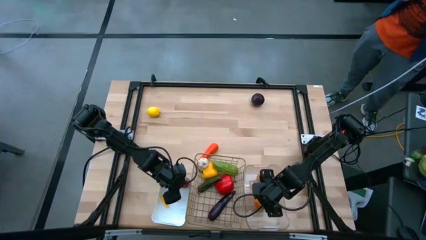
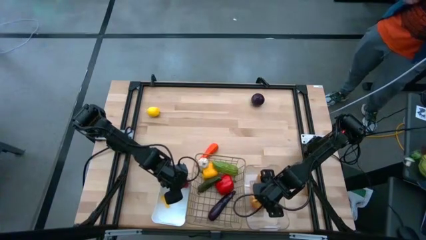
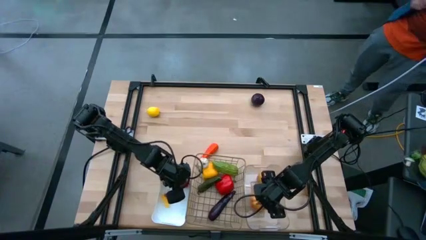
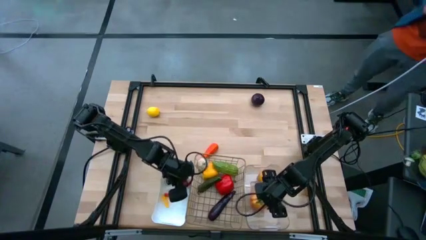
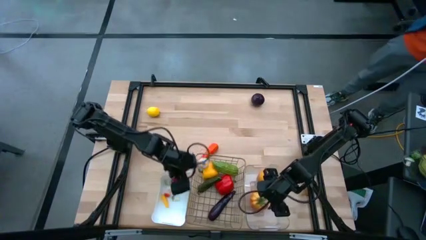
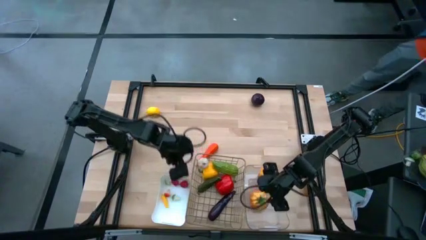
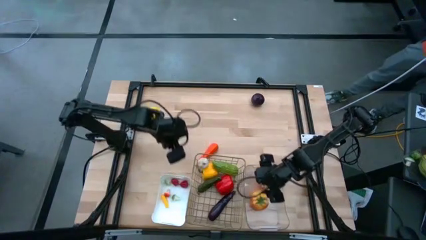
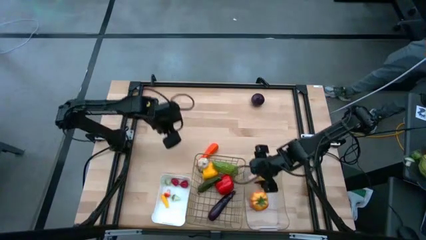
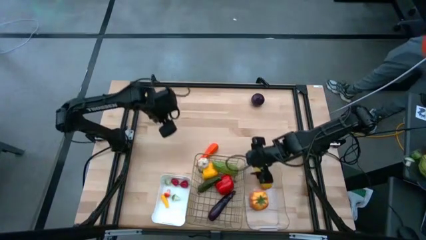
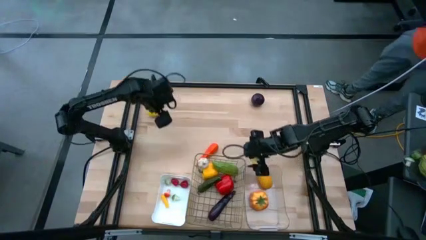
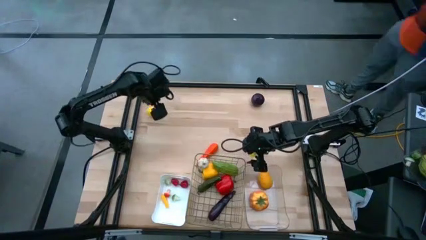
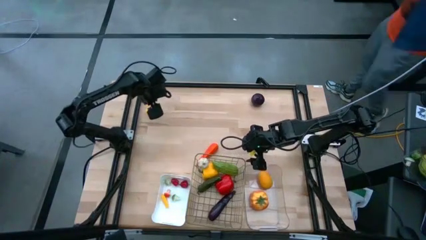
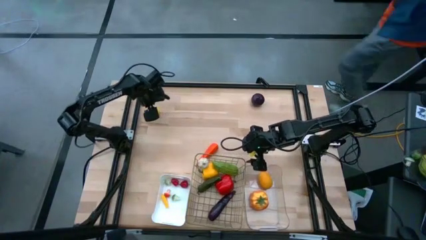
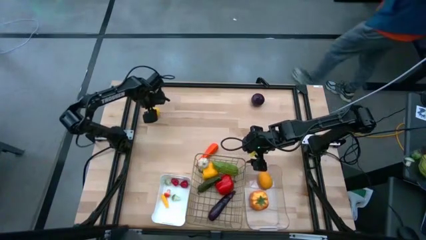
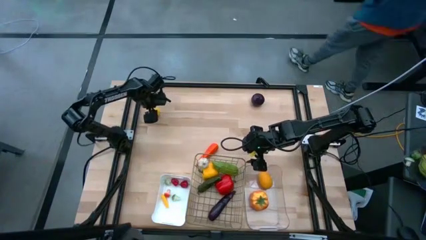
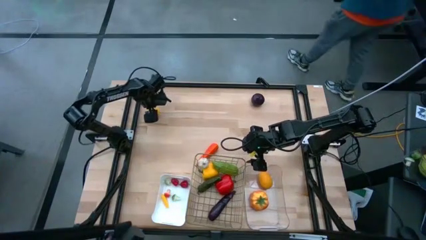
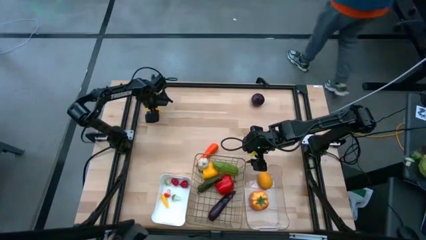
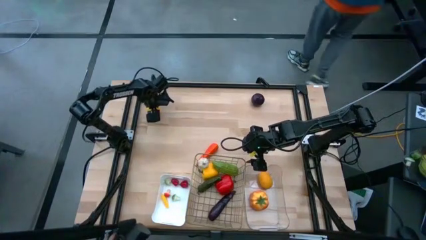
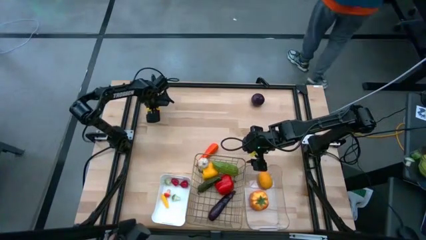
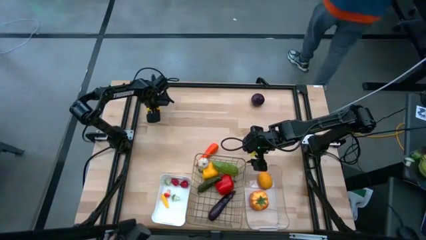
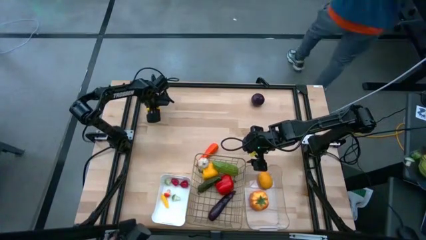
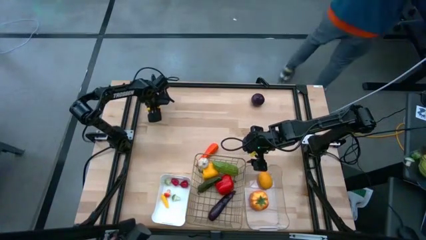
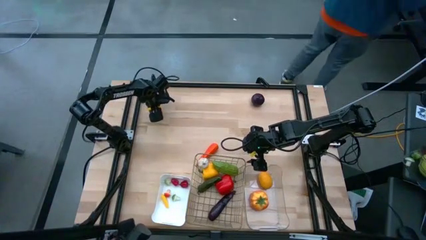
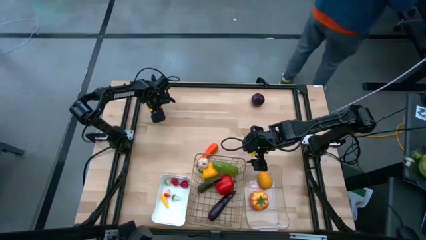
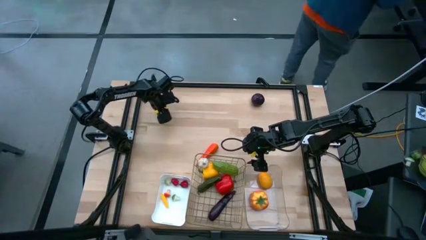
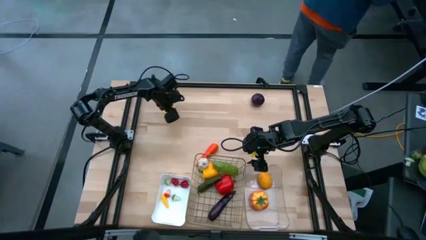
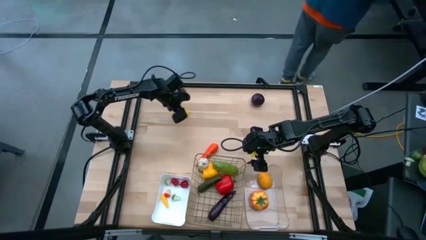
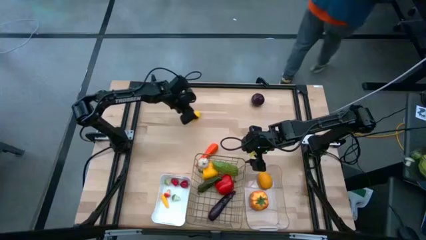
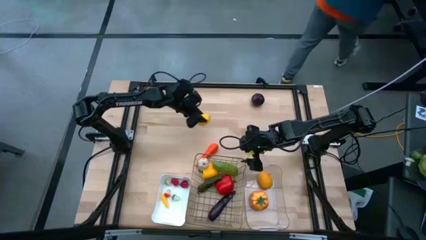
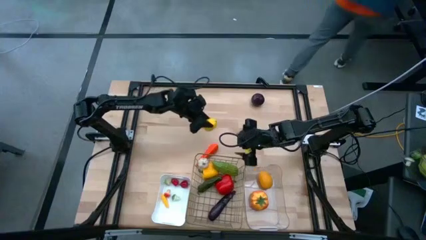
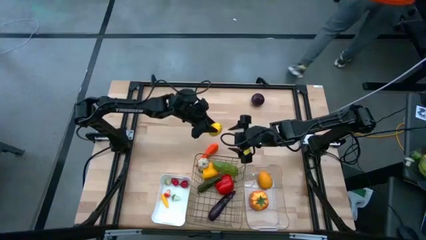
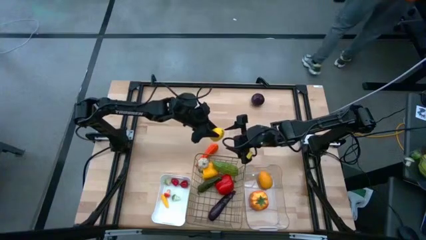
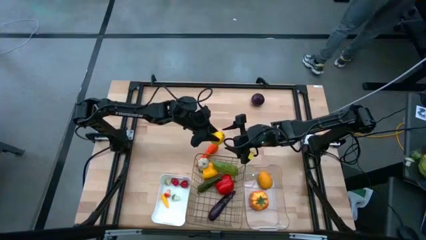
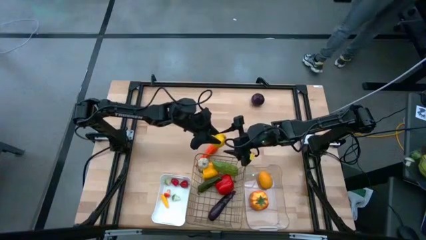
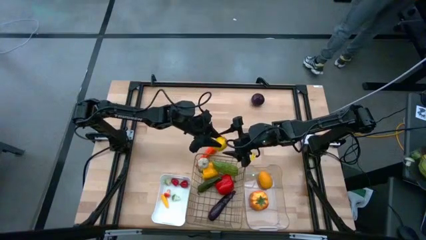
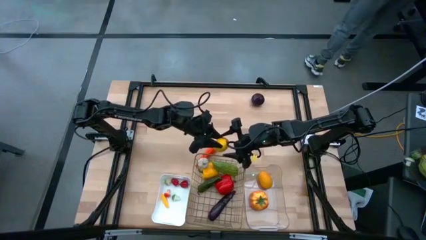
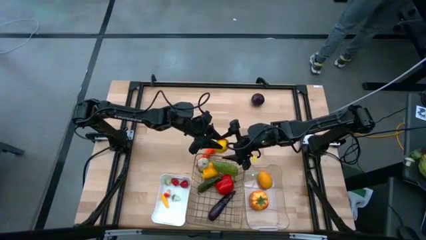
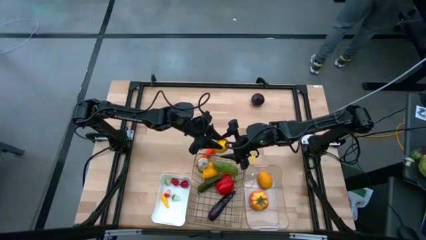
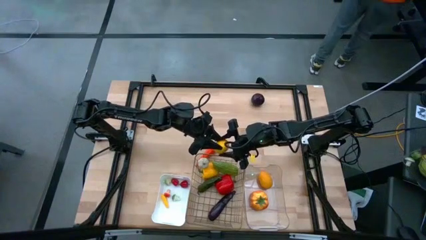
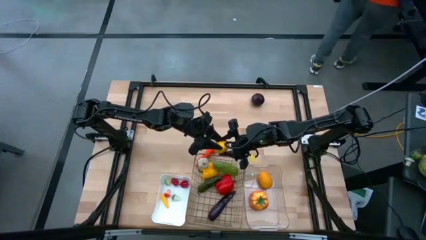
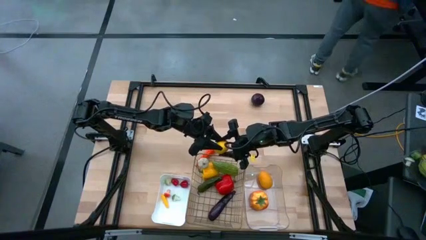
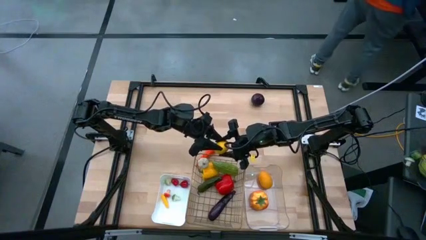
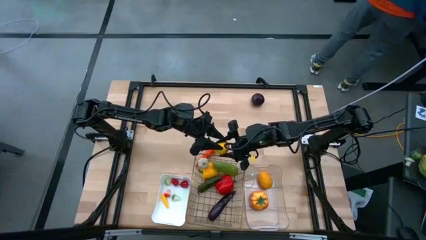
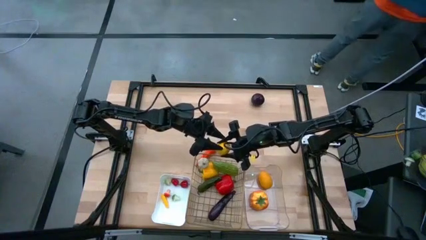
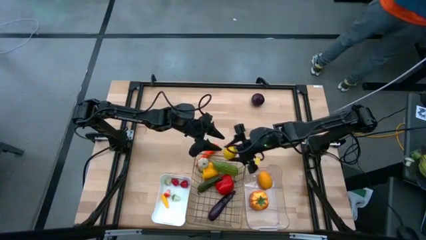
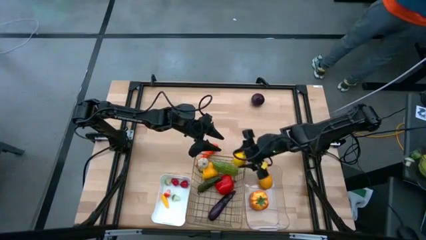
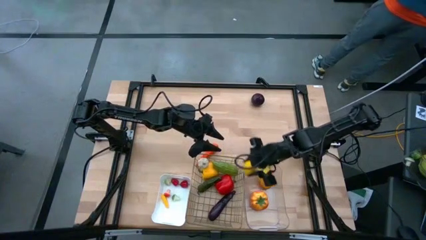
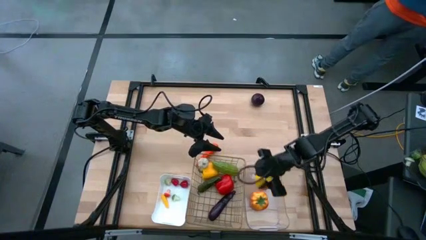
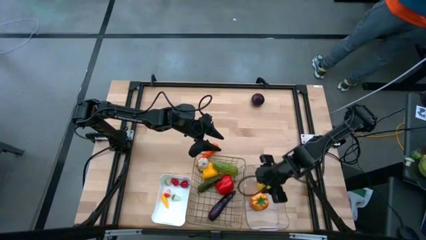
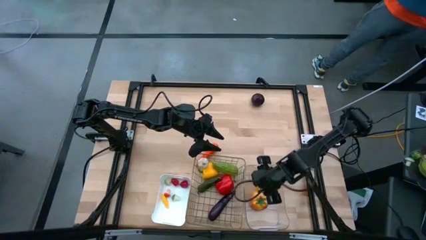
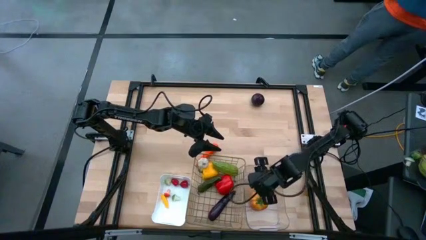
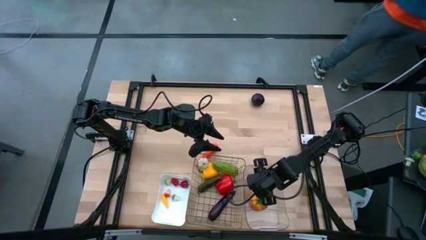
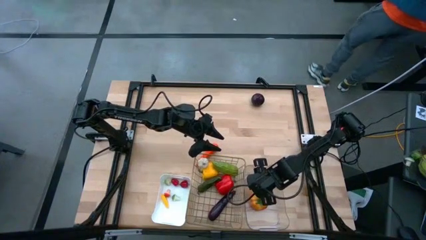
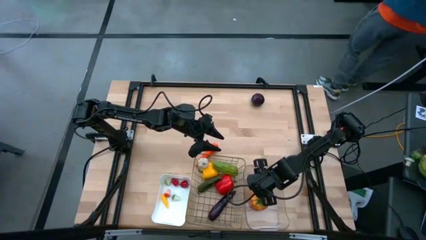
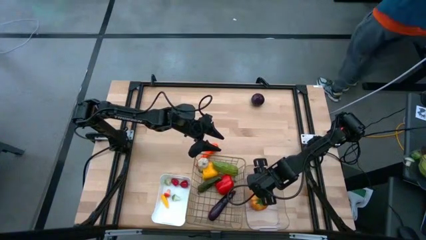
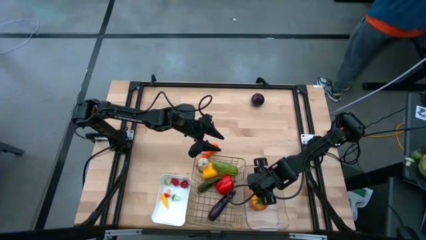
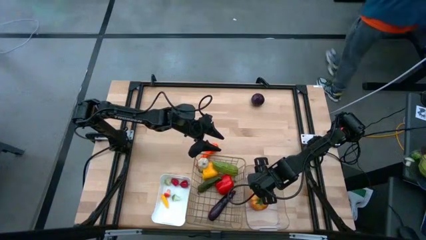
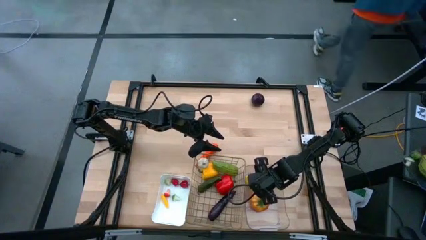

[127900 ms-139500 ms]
Task: Sort produce into baskets
Put the yellow lemon into the transparent bin

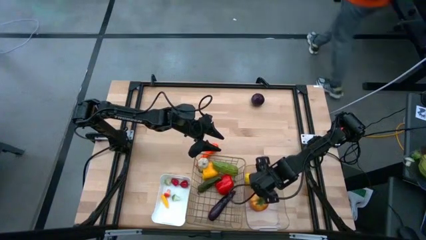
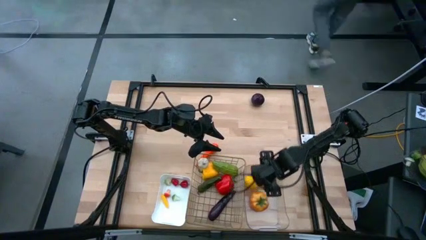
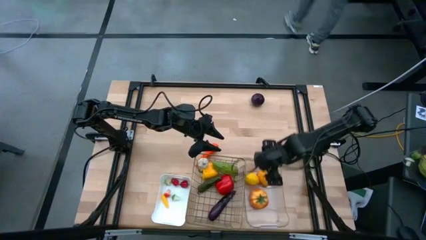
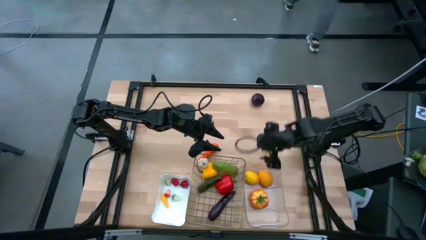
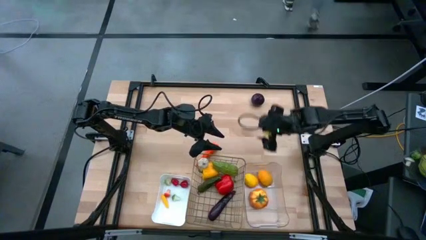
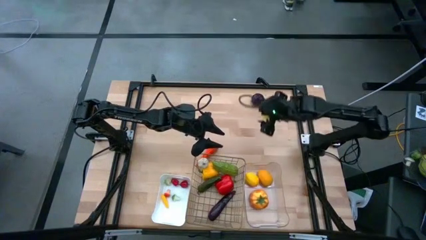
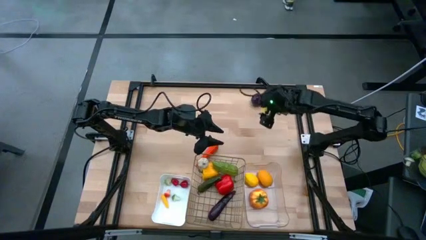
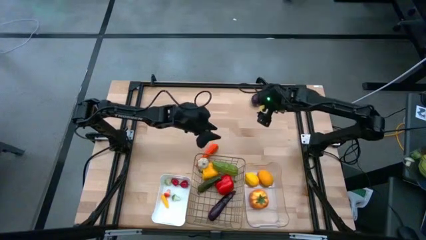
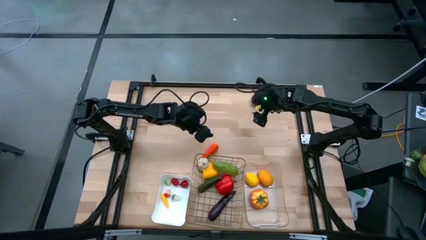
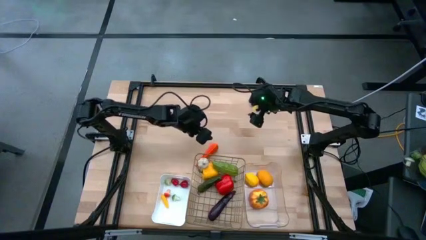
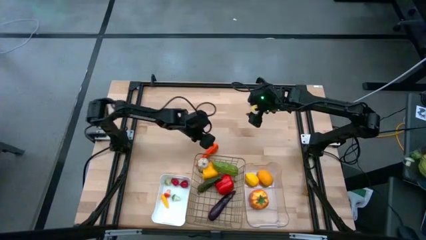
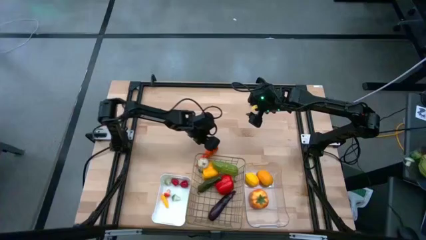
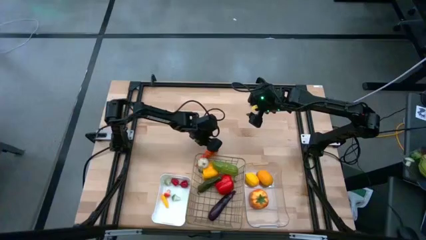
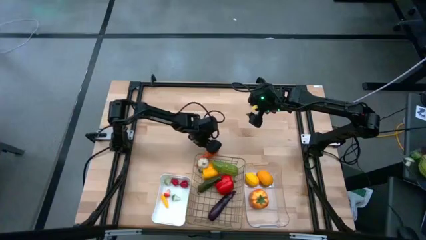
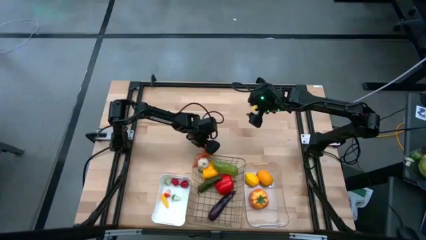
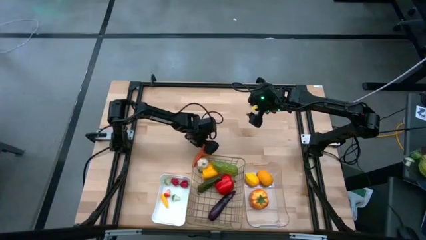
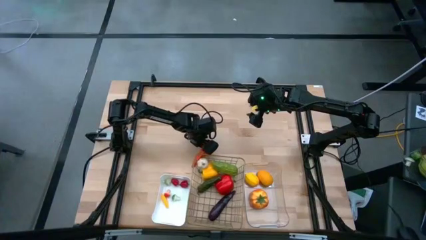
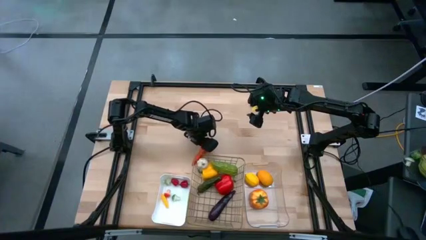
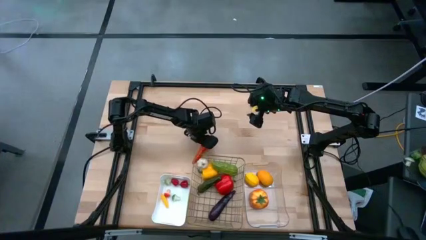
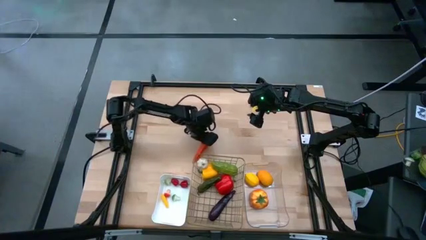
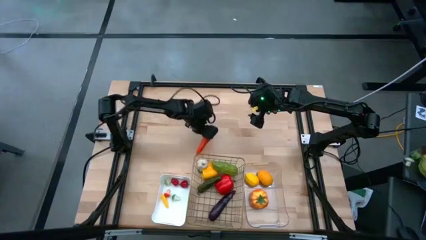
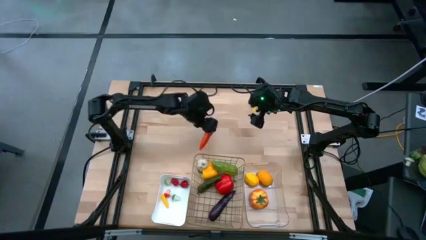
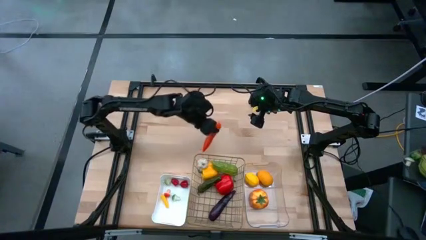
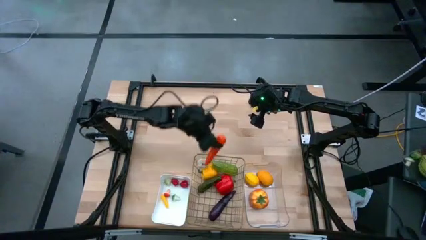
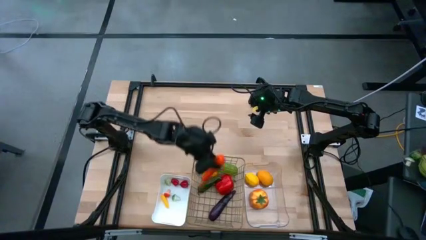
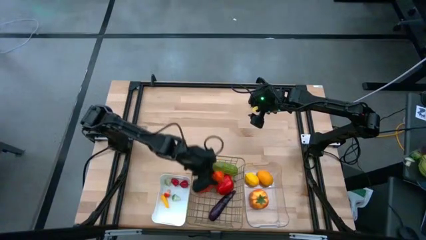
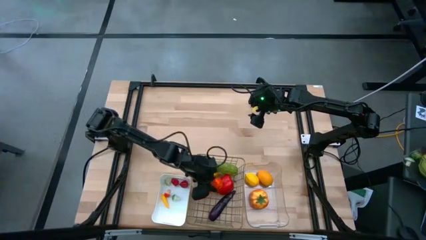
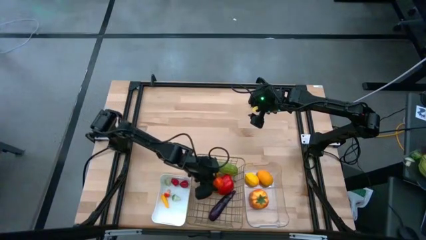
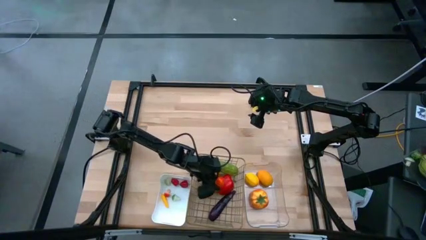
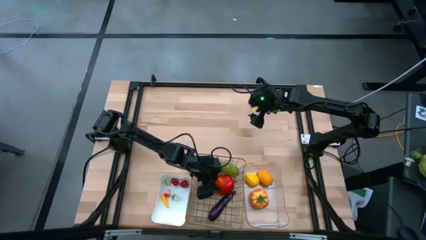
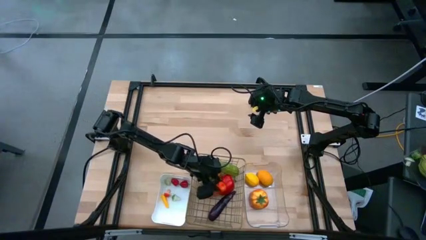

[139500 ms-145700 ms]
Put the orange carrot into the wire basket
